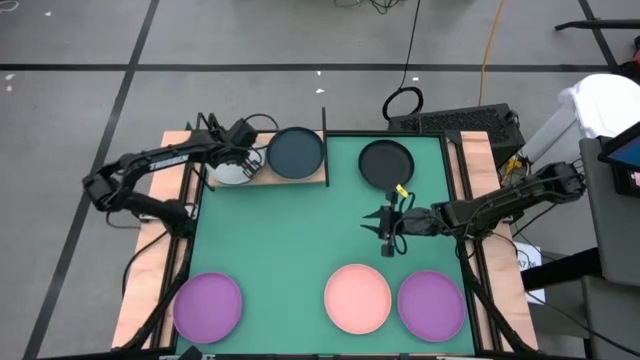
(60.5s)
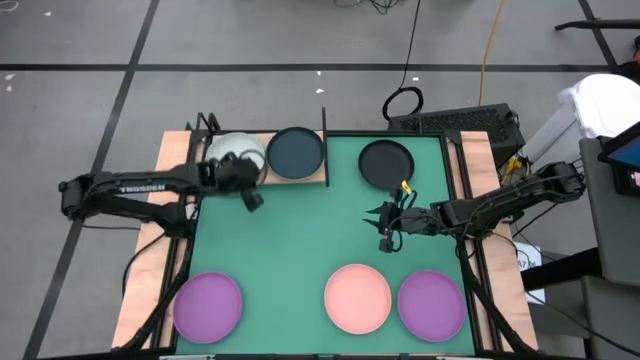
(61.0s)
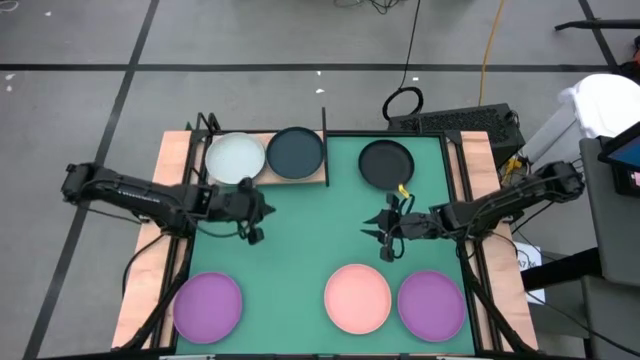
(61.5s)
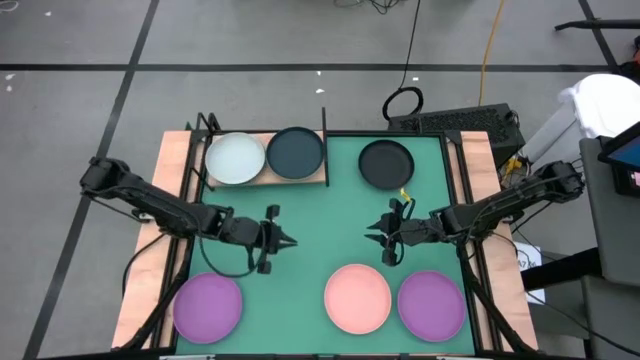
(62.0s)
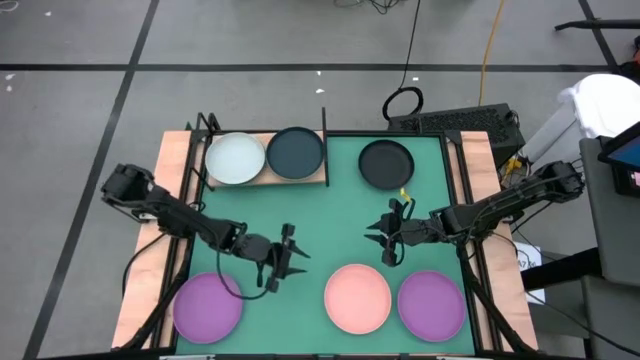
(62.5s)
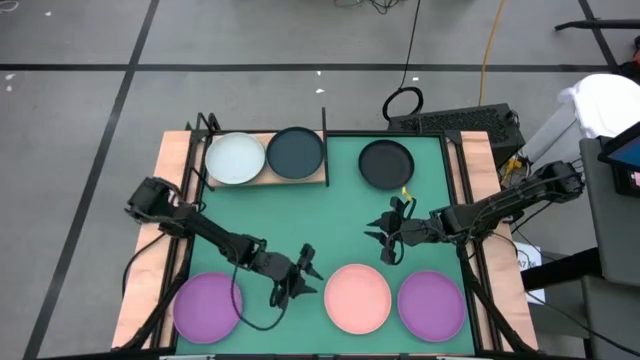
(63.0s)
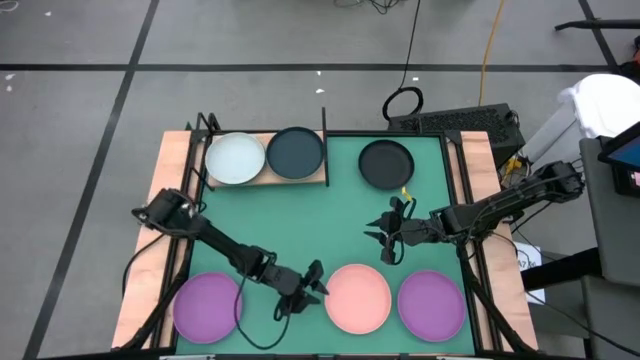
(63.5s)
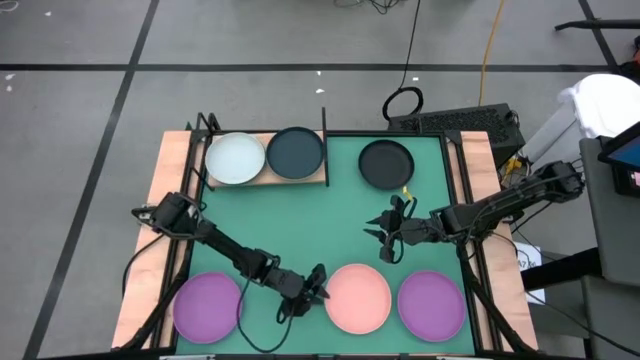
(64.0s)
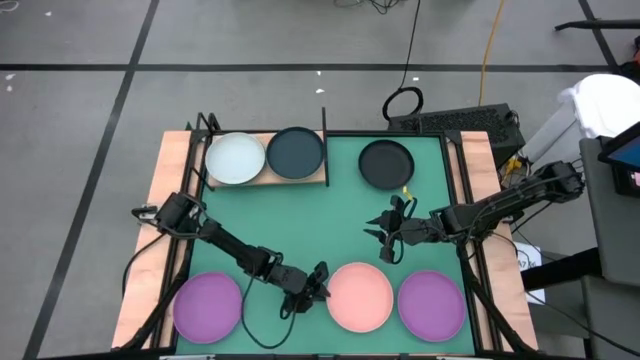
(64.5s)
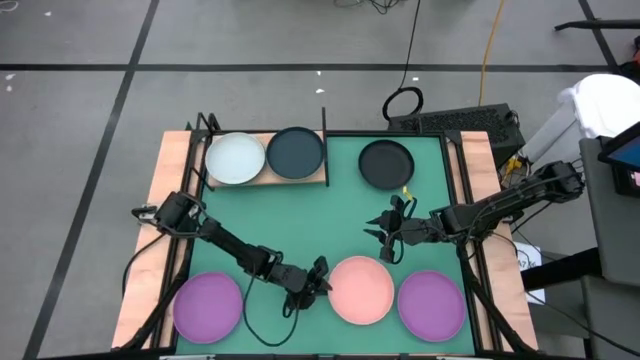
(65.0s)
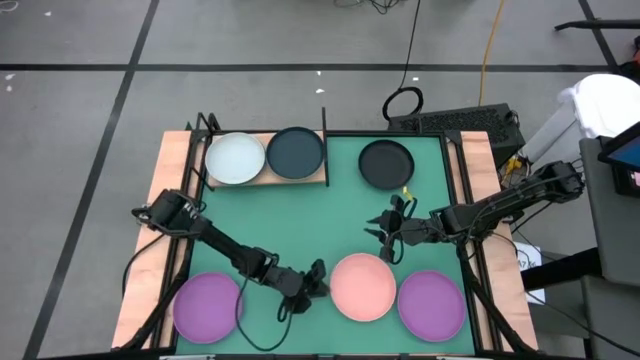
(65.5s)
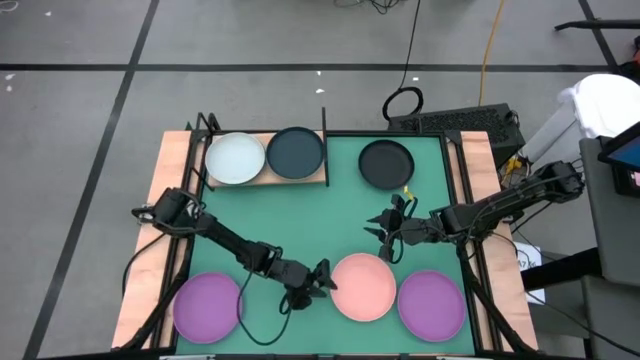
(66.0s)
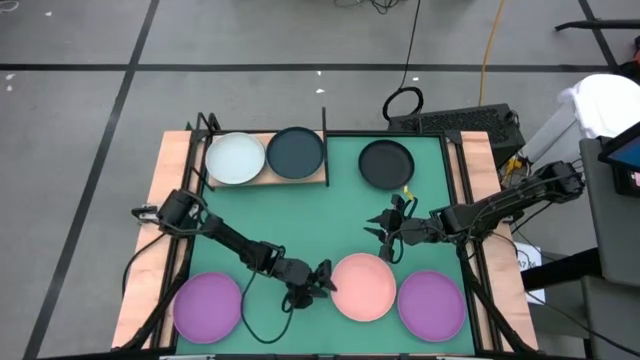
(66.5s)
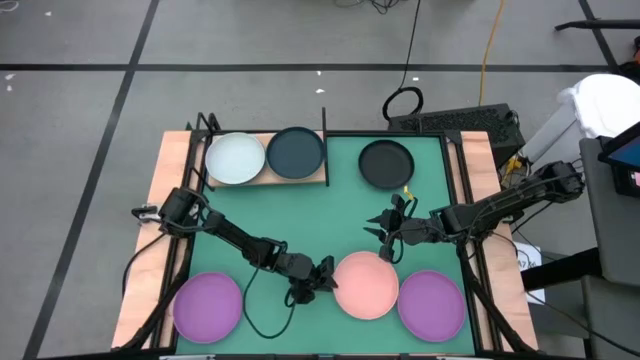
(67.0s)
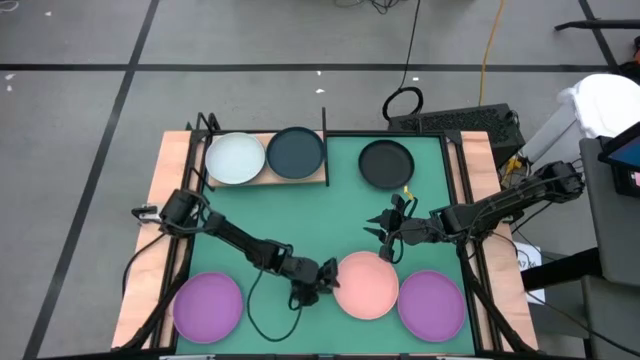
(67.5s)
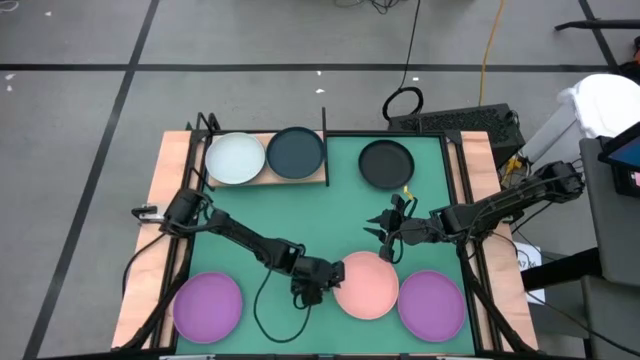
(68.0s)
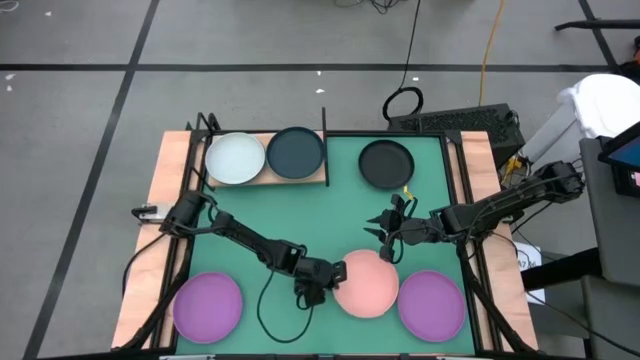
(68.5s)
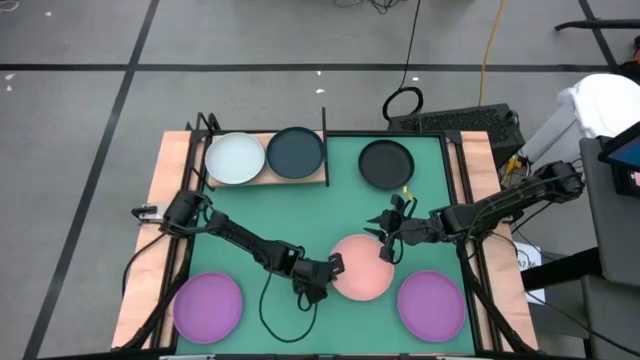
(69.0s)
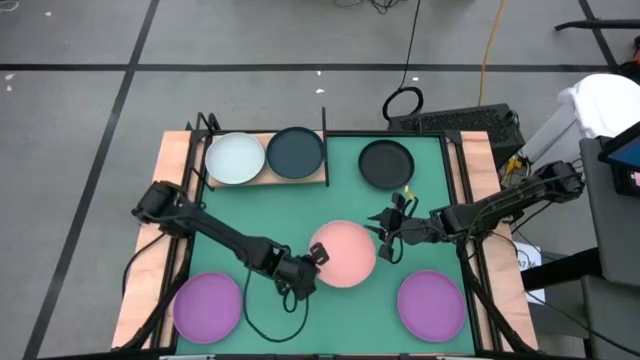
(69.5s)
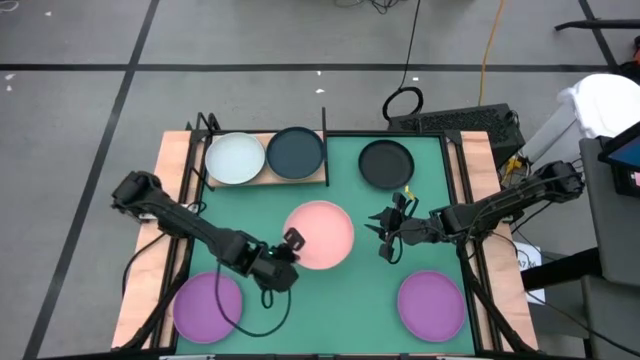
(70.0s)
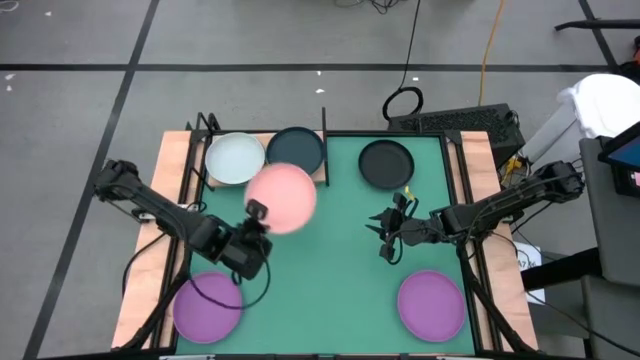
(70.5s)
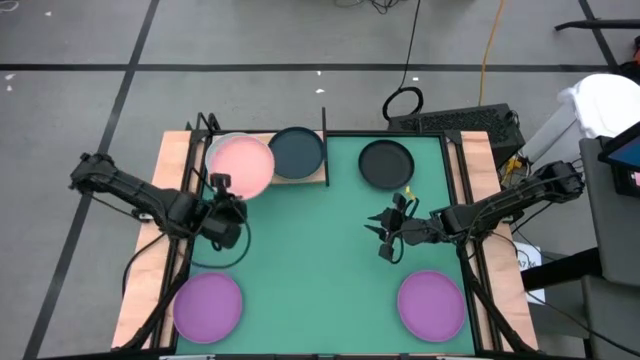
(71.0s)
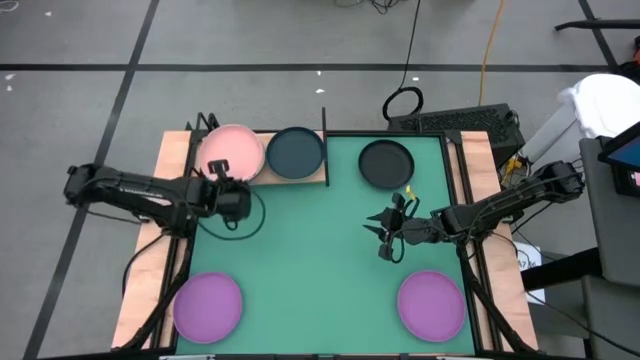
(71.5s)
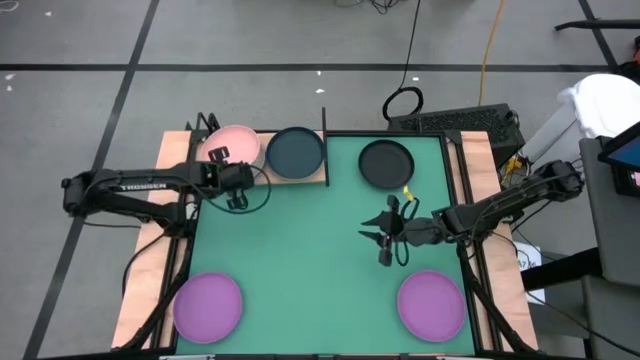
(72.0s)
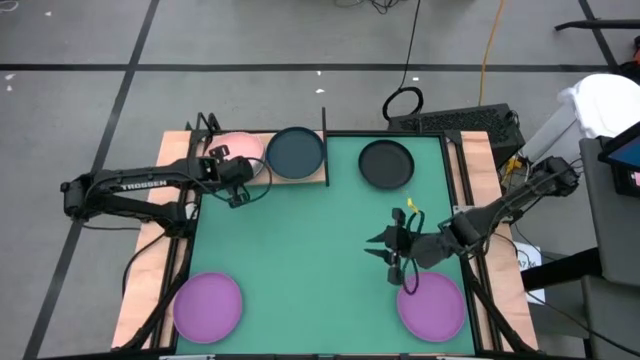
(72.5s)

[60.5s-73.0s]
Task: Place and stack plates onto a shelf
Stack the pink plate on top of the gray plate on the shelf

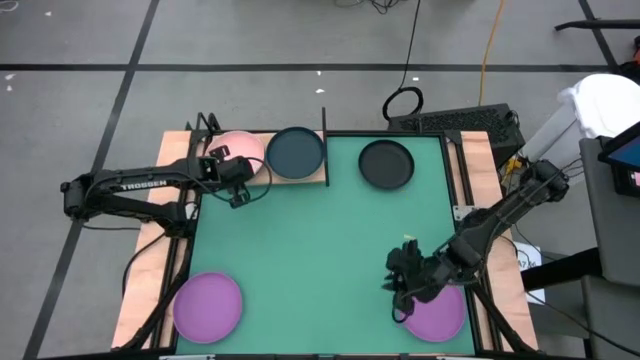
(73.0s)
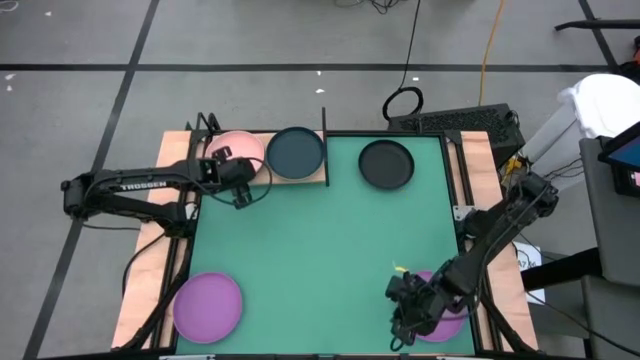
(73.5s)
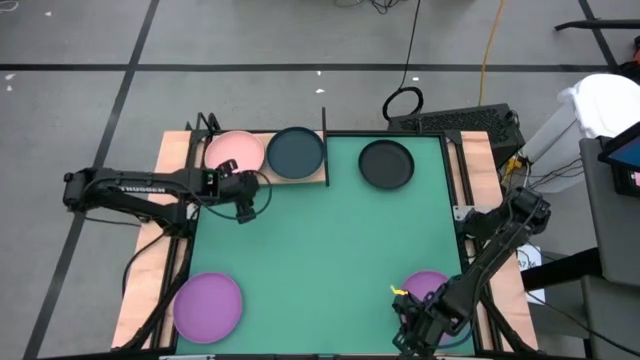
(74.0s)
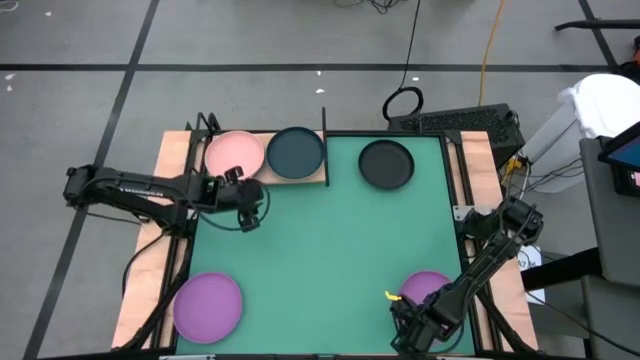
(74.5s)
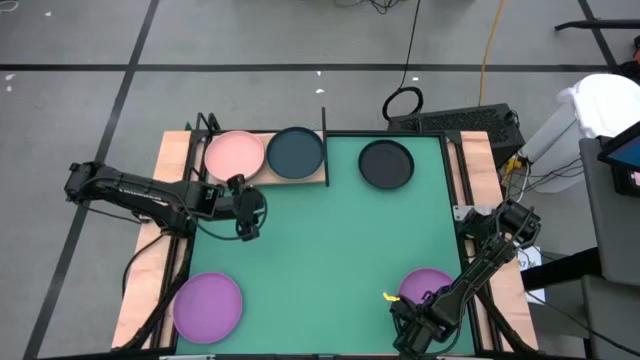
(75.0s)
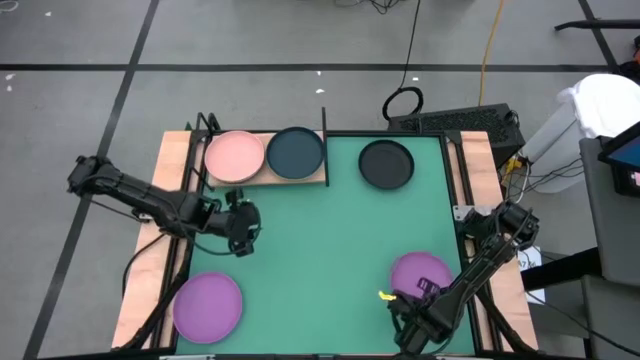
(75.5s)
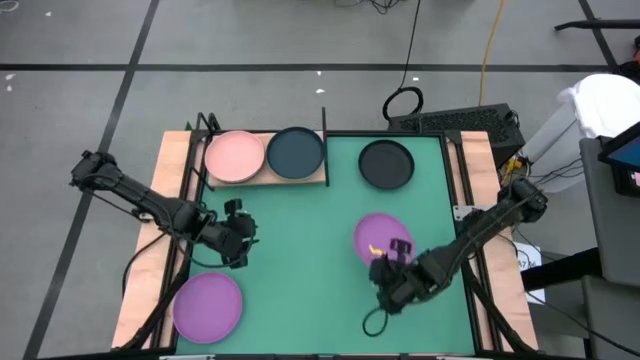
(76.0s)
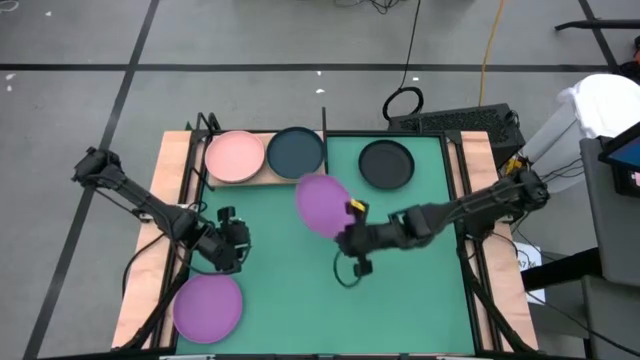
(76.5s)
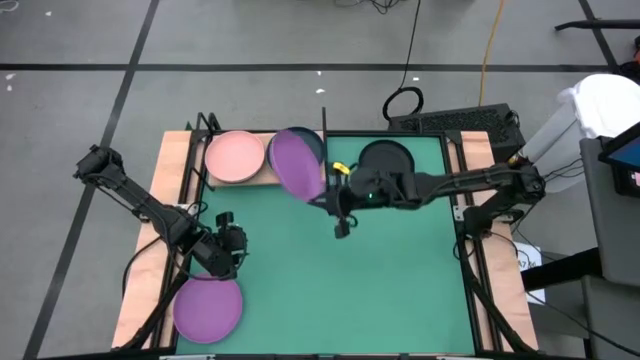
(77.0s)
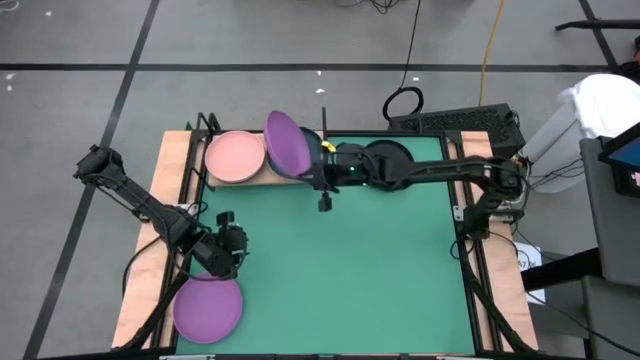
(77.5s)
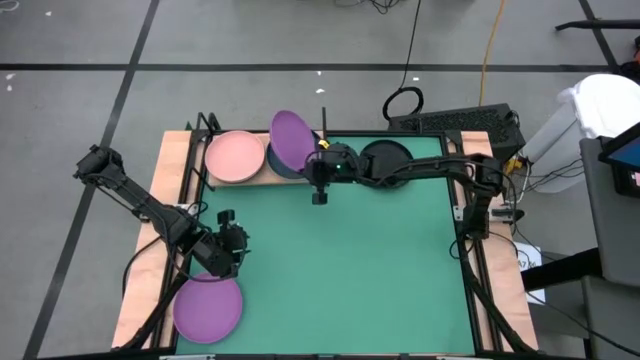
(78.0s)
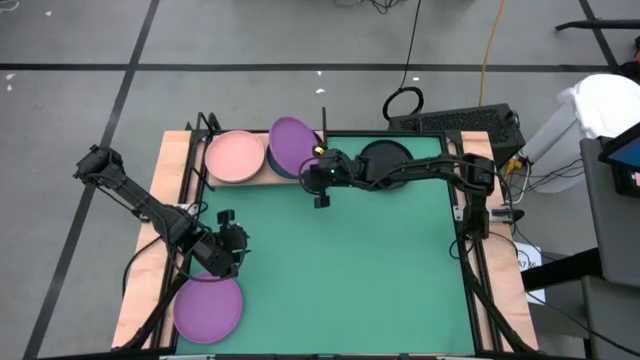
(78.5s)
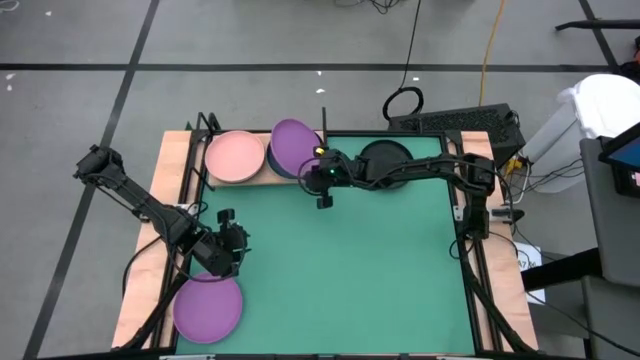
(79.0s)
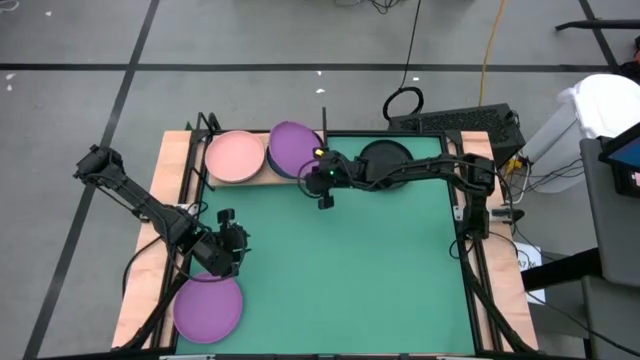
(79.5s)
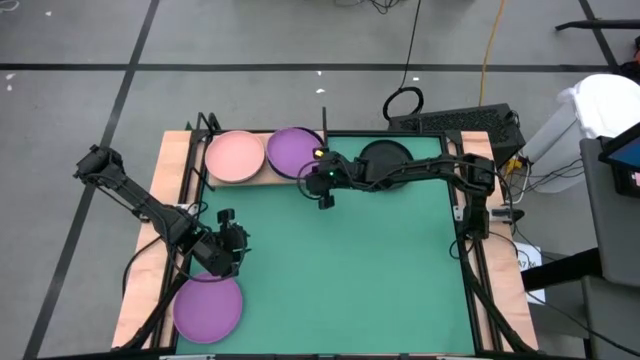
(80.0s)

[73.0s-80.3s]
Stack the right violet plate on top of the dark blue plate on the shelf

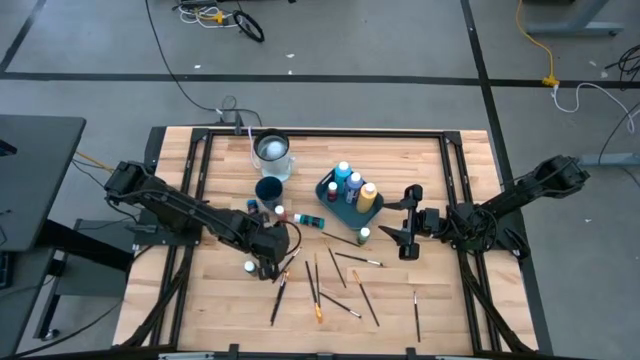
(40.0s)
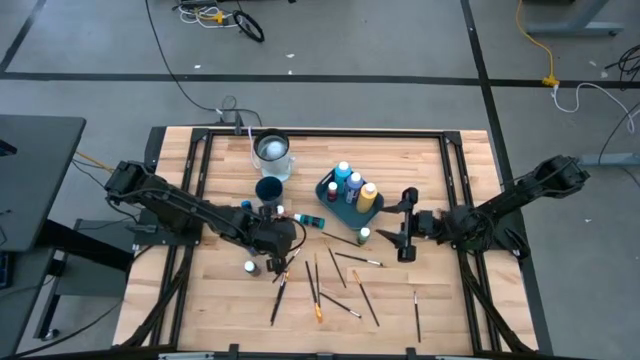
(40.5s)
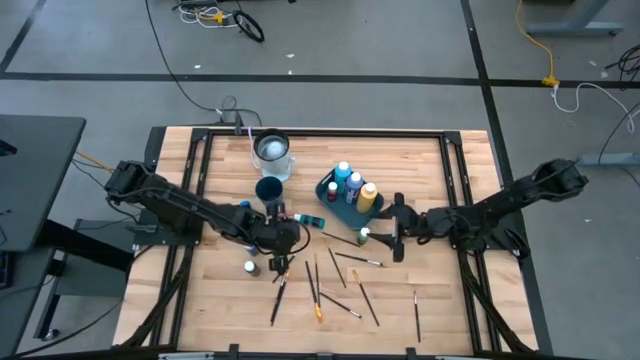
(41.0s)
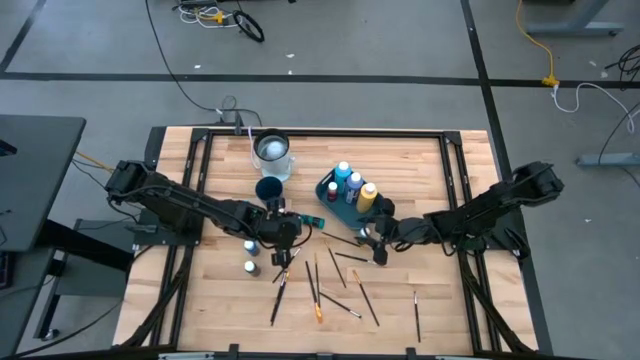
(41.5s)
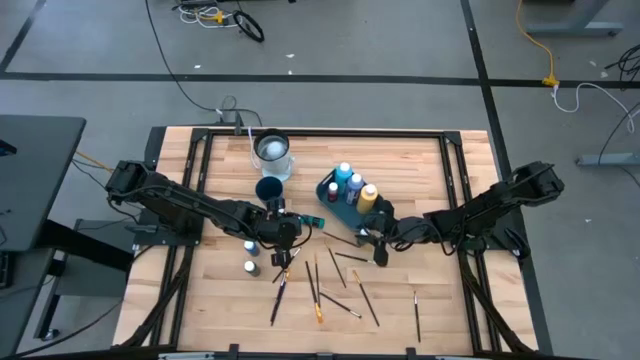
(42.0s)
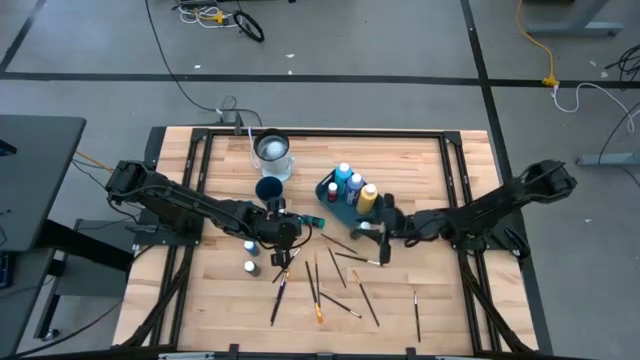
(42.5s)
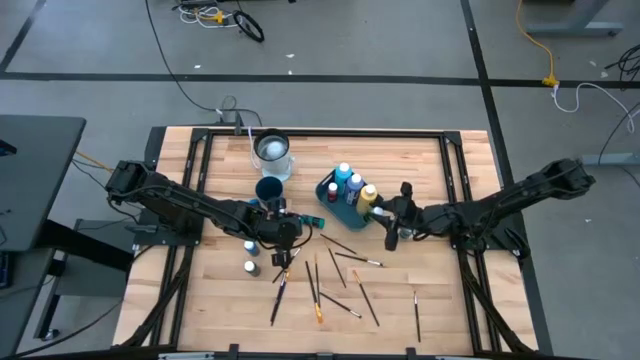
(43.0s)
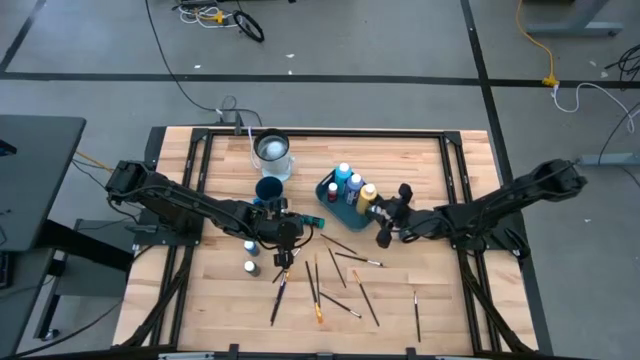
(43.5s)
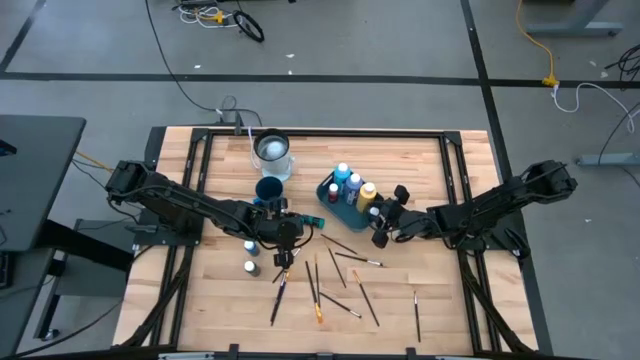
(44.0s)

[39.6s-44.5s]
Task: Pick & Place Paint Supplies
Put the green paint bottle into the blue bin
